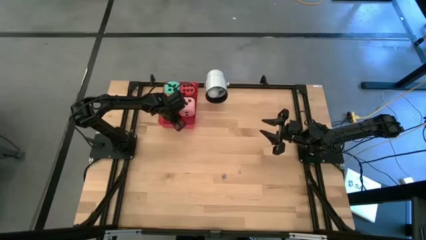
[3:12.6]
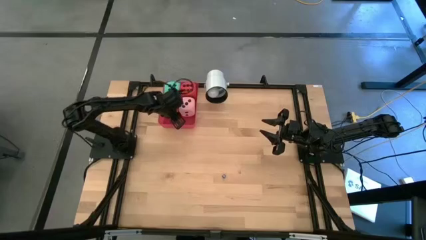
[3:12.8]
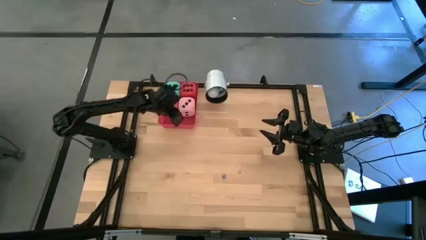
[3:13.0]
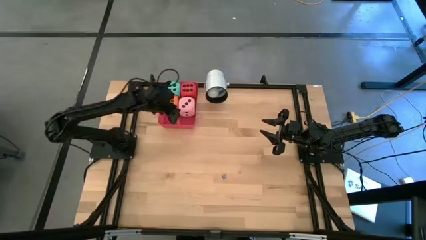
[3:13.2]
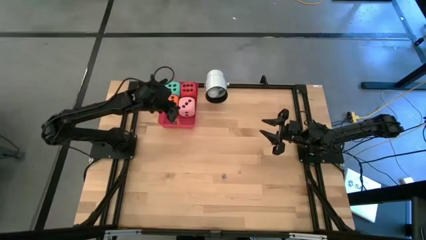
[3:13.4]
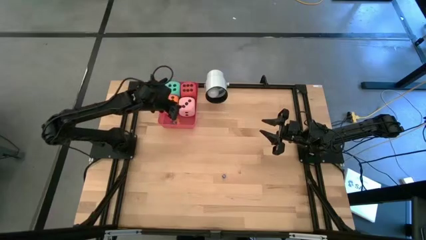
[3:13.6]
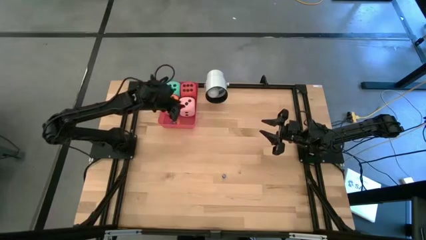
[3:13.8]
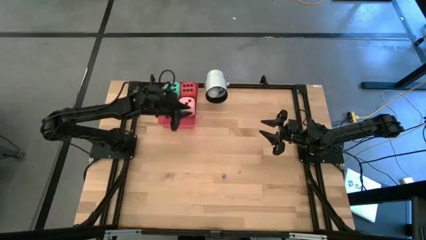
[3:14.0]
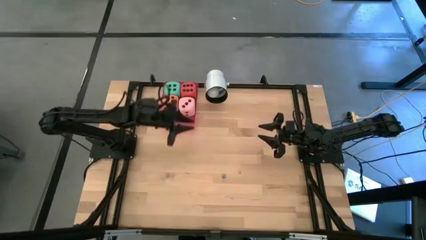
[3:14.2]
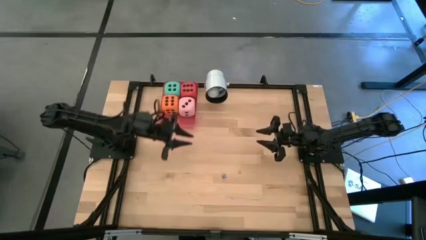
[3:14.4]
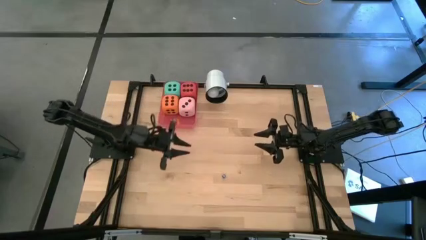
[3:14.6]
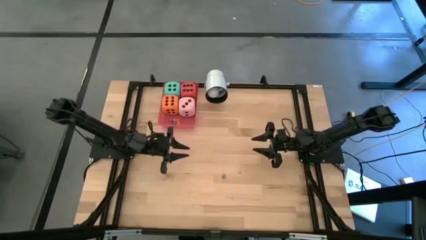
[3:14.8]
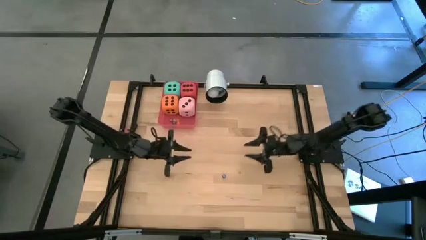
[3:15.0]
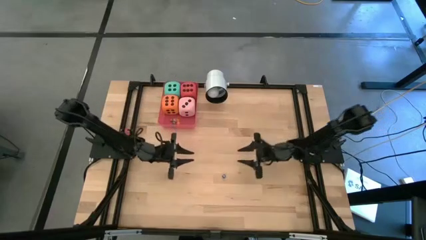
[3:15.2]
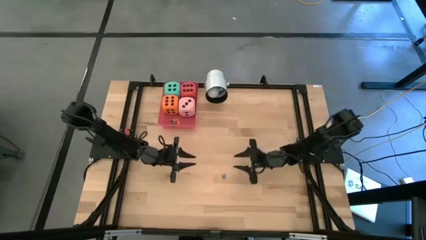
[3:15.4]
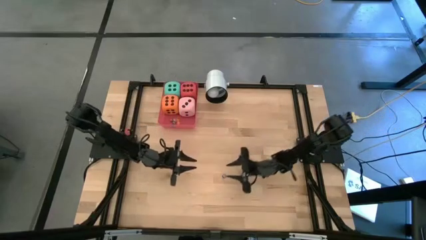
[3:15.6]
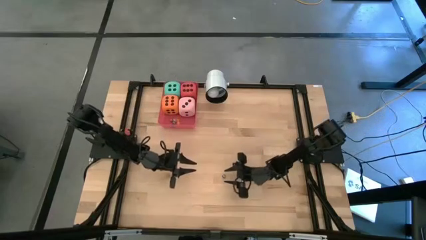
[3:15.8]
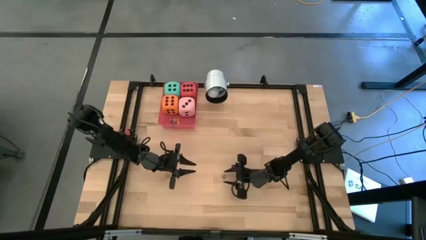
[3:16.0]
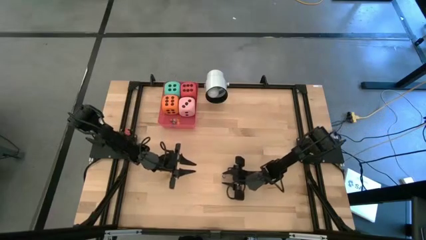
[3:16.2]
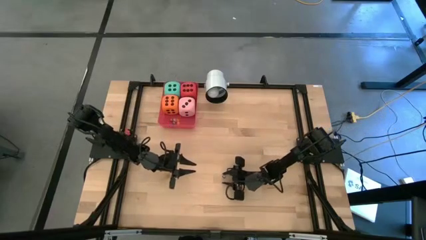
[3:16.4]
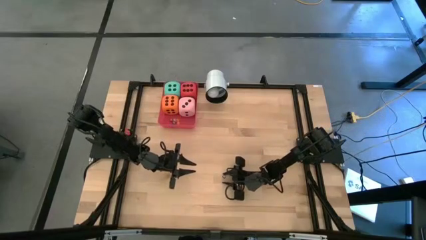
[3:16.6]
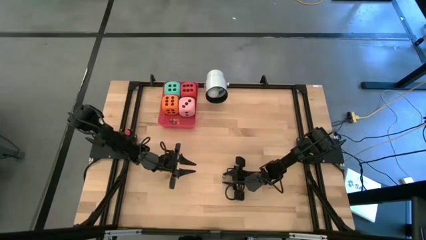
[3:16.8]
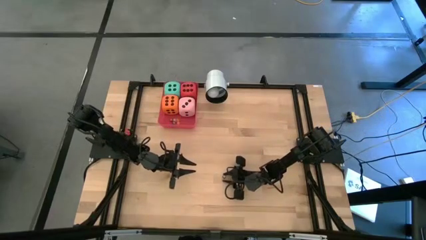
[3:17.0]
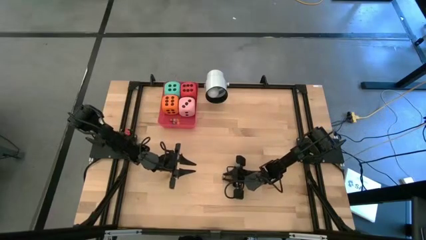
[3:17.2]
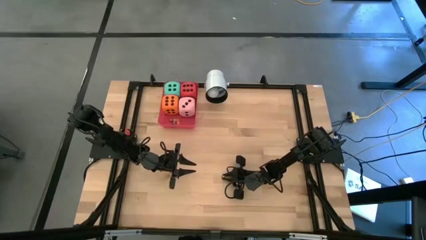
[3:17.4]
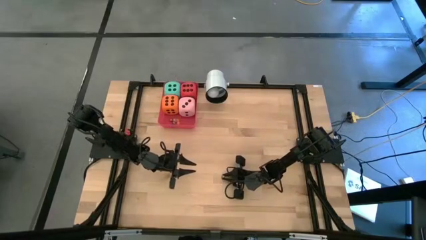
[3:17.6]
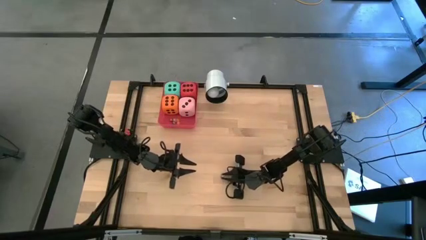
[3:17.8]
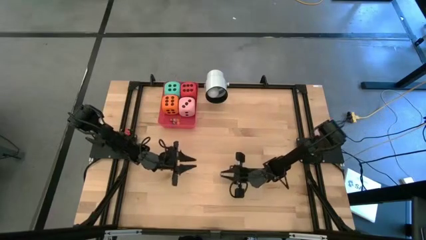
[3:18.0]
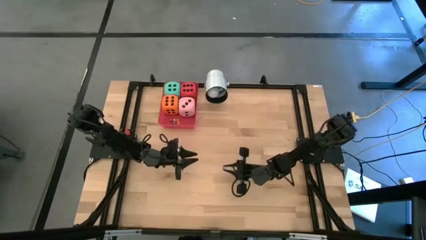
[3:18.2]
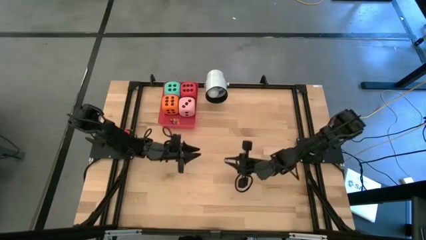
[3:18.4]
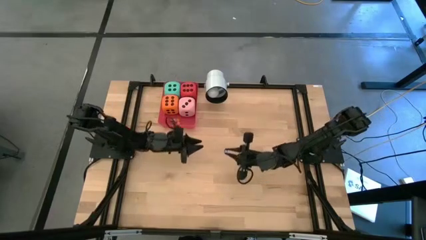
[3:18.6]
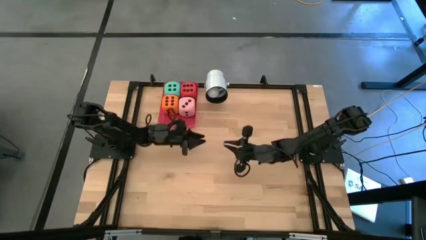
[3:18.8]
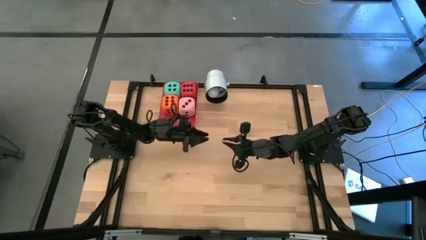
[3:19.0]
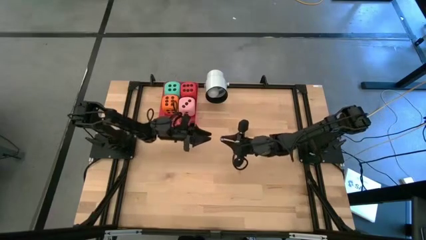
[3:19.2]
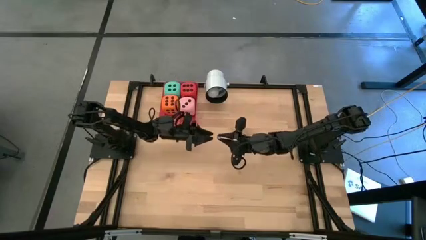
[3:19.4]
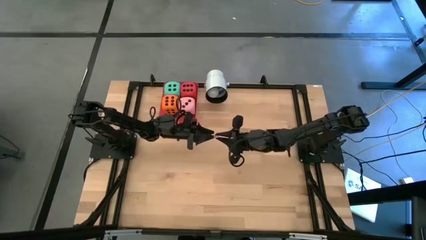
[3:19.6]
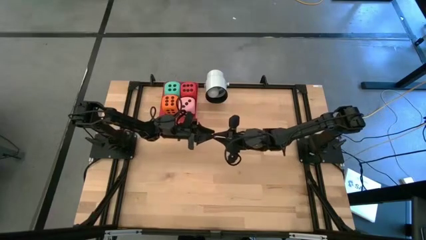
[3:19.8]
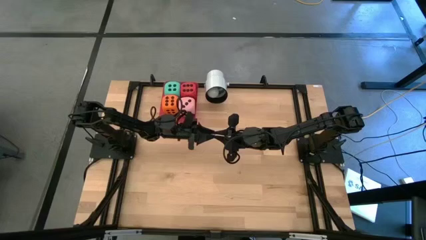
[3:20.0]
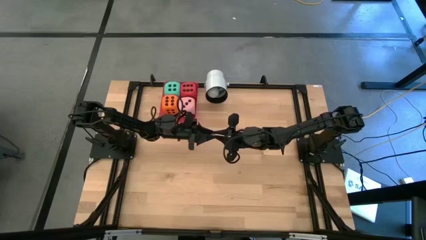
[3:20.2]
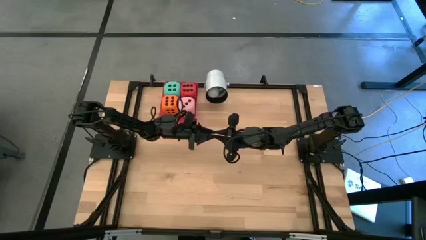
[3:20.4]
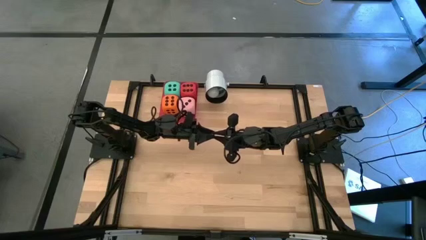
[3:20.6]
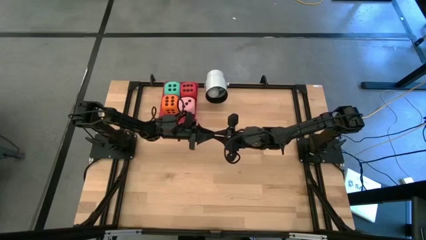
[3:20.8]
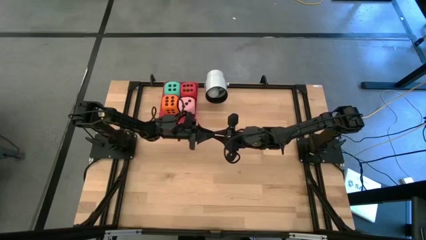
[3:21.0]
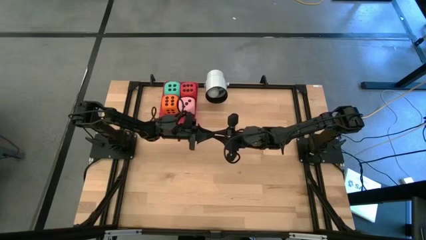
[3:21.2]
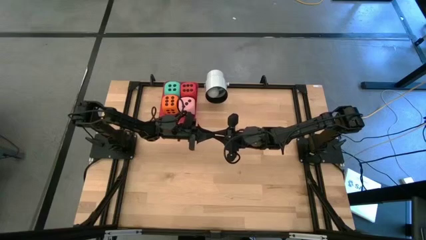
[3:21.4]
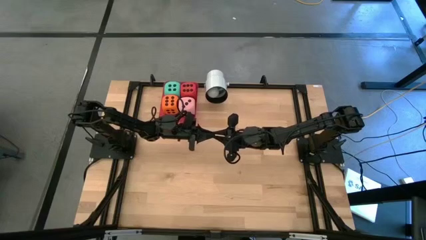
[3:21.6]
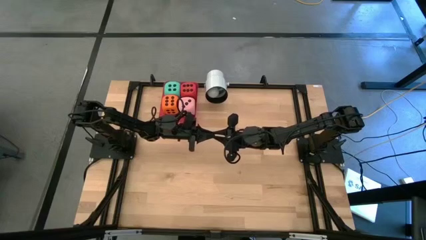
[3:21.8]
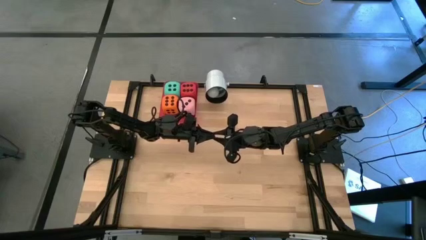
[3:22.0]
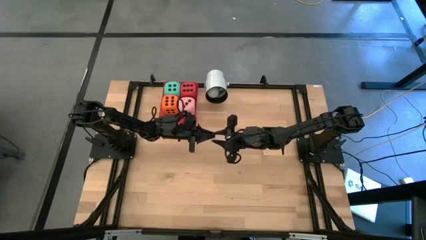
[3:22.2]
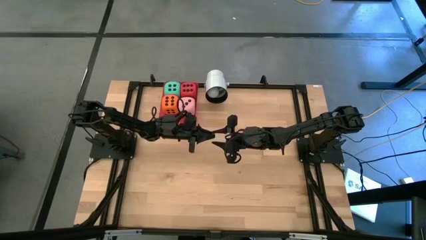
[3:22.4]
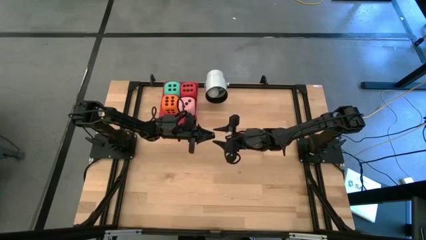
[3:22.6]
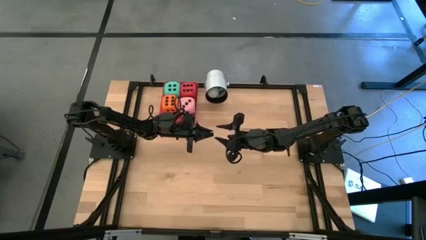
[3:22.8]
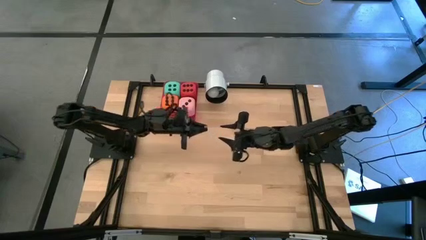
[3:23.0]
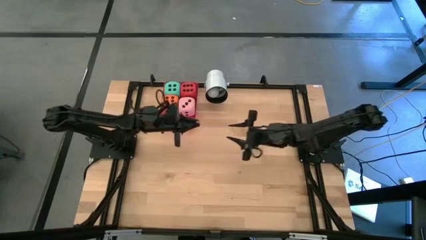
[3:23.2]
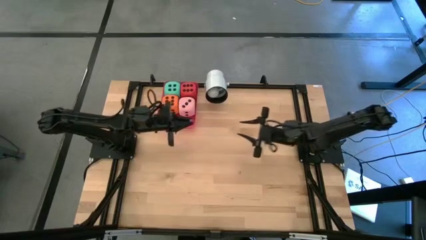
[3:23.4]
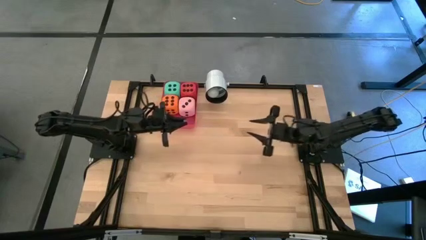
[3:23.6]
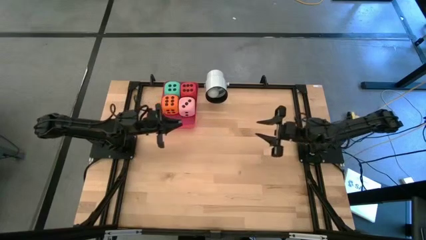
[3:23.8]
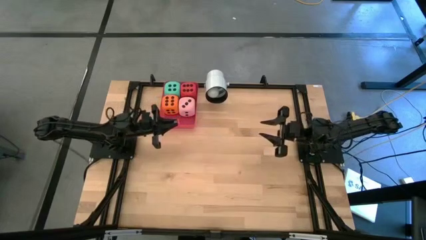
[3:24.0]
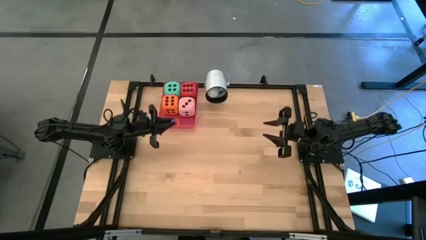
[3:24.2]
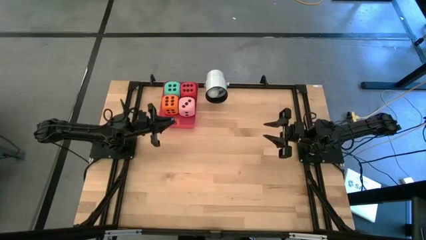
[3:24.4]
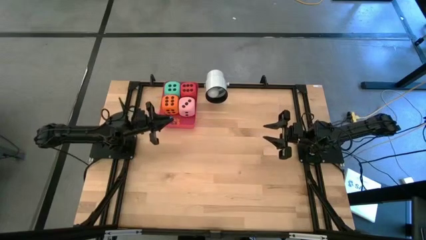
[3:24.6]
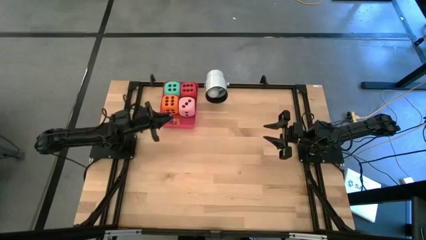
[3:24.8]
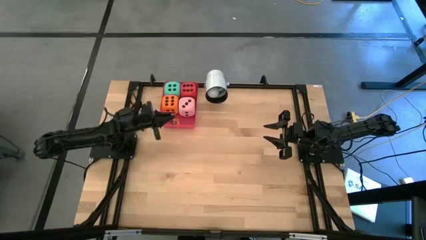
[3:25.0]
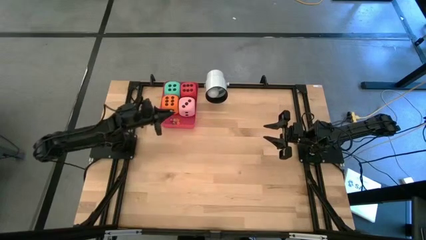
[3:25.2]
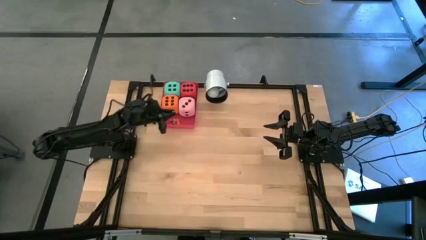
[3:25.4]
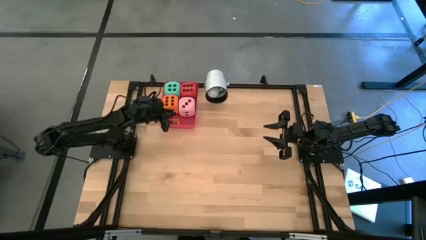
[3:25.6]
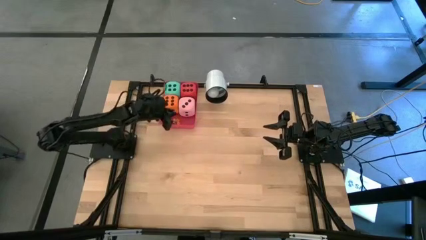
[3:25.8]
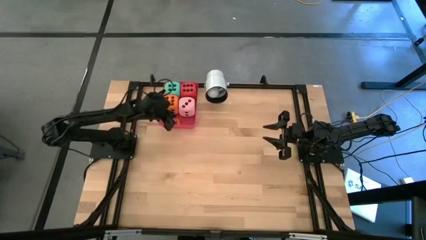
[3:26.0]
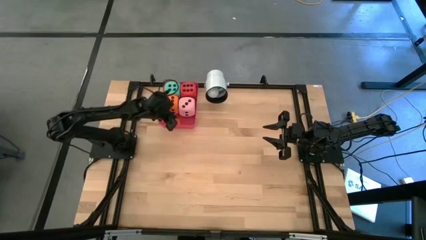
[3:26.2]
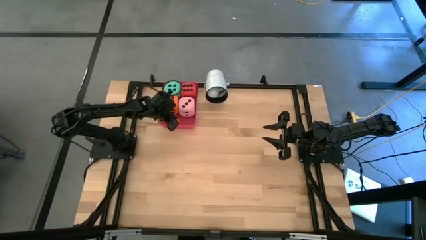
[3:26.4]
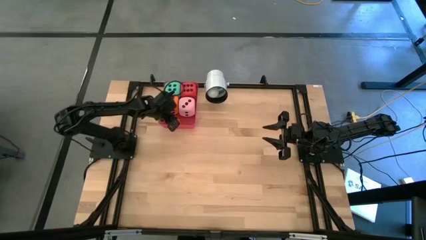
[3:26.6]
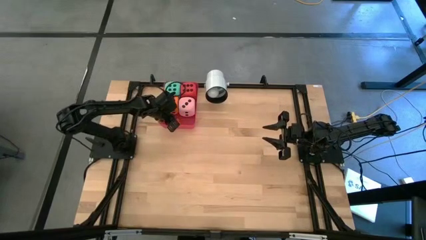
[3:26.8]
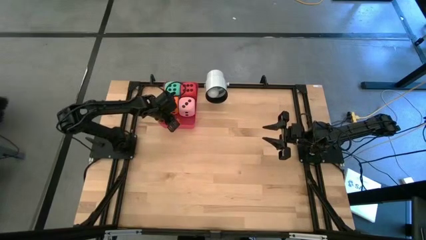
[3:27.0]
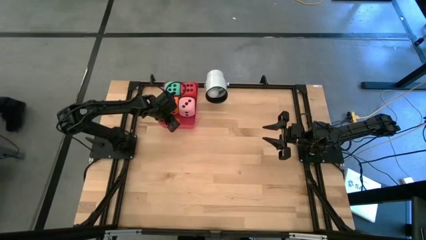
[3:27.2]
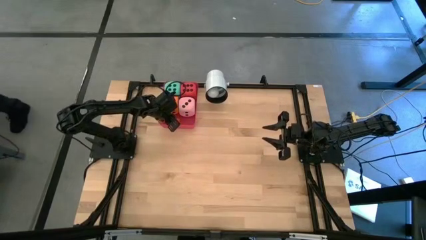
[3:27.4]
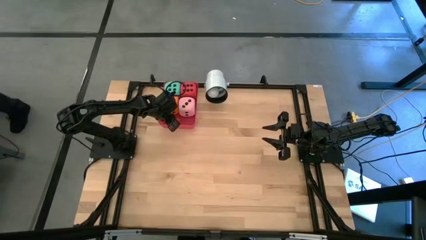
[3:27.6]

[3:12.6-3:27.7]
Task: Pick & Place Dice
Put the small blue dice into the red bin

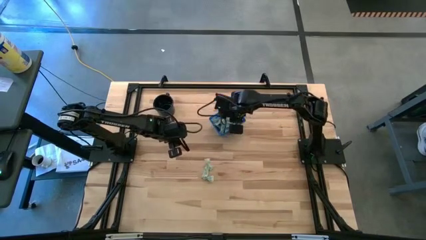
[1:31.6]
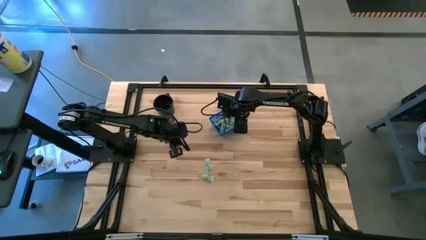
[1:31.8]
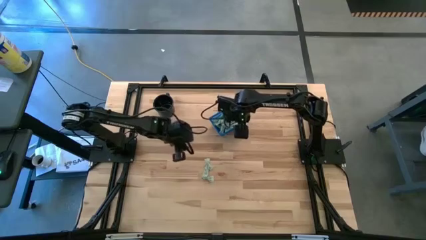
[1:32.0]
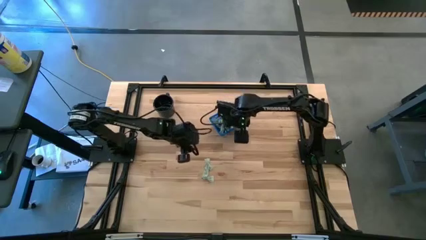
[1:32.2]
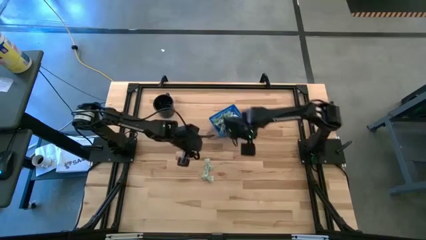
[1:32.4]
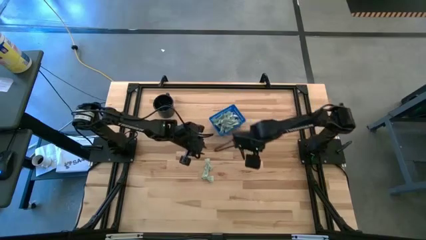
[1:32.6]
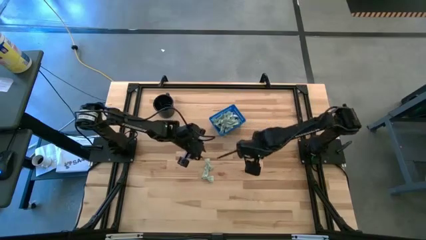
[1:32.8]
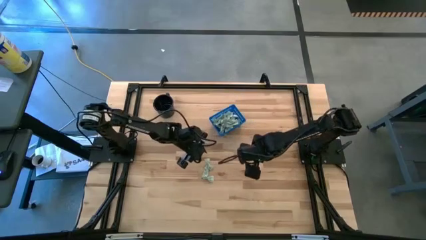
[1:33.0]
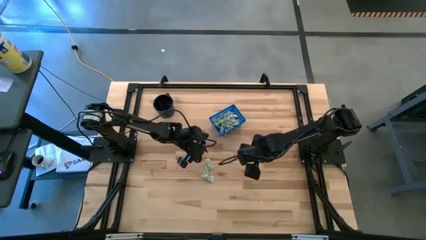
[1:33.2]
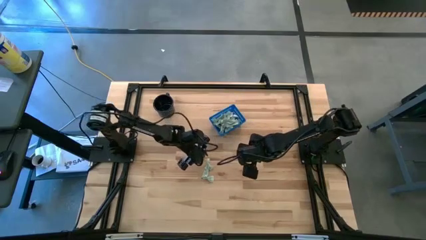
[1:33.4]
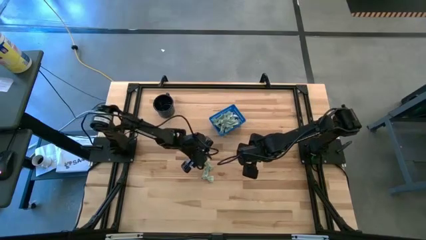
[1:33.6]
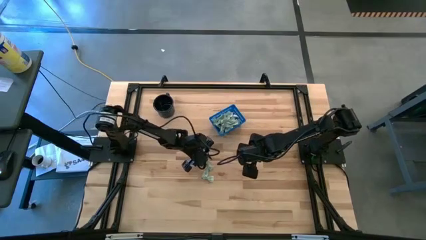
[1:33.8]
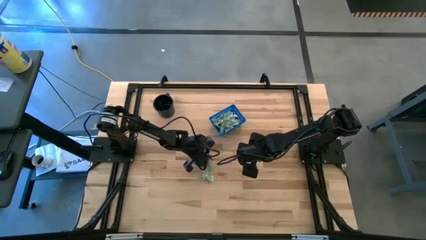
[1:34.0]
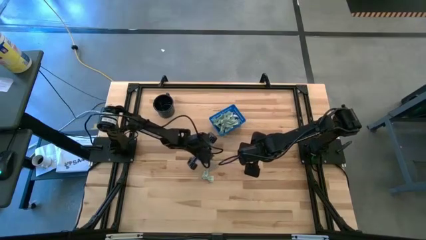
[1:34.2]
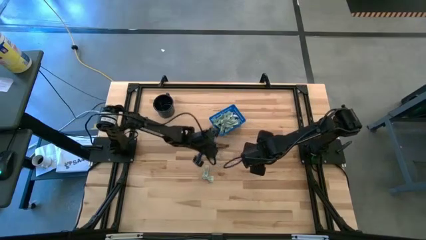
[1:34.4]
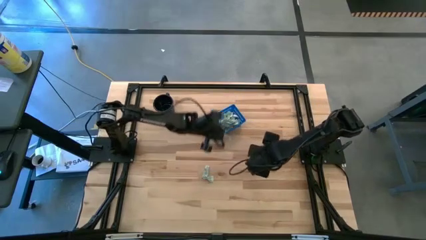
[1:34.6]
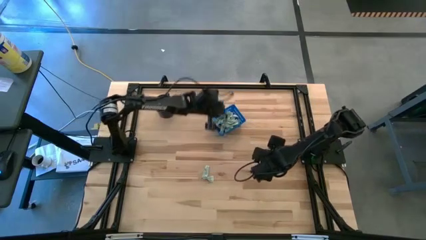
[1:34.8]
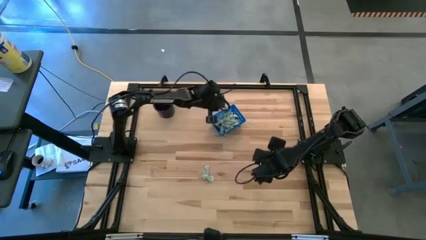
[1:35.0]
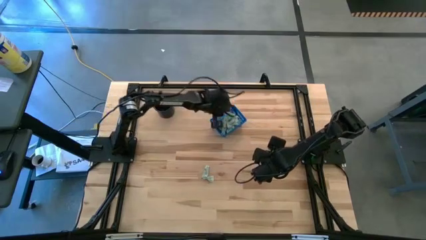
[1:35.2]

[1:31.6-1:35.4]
Task: Pick and place Stevia / Truvia into bins
Put the green stevia packet into the blue bin
